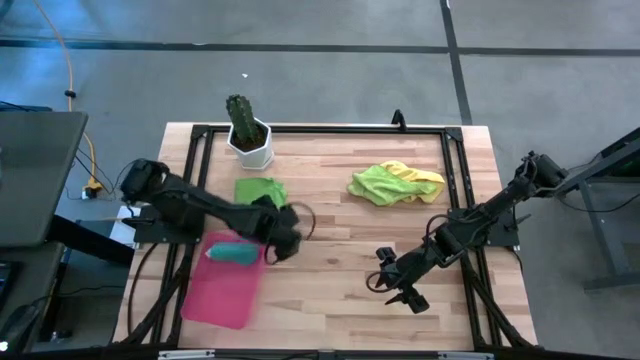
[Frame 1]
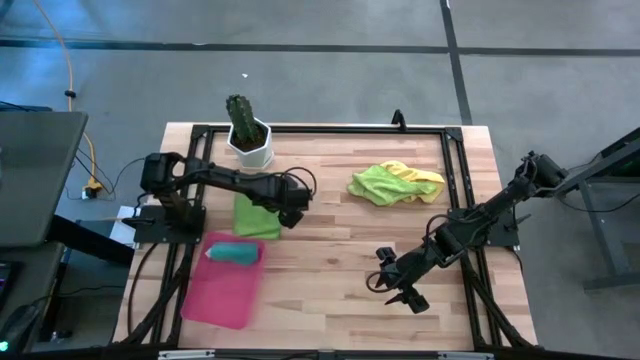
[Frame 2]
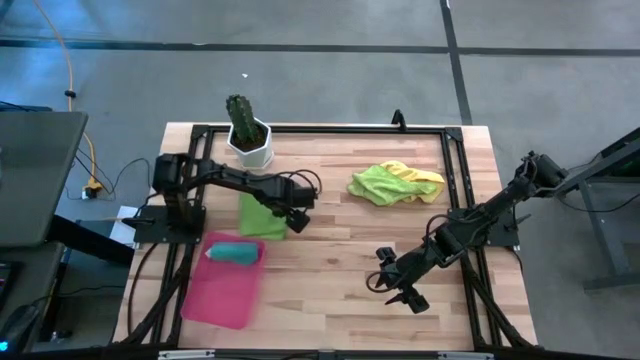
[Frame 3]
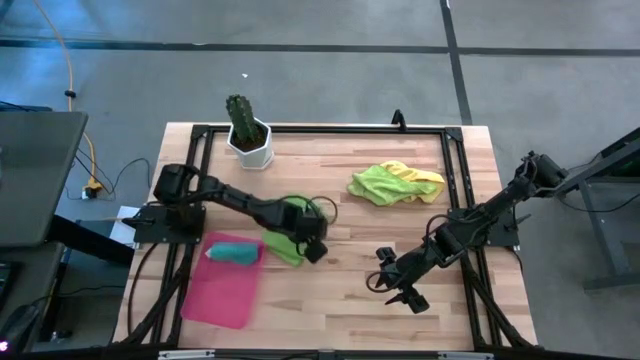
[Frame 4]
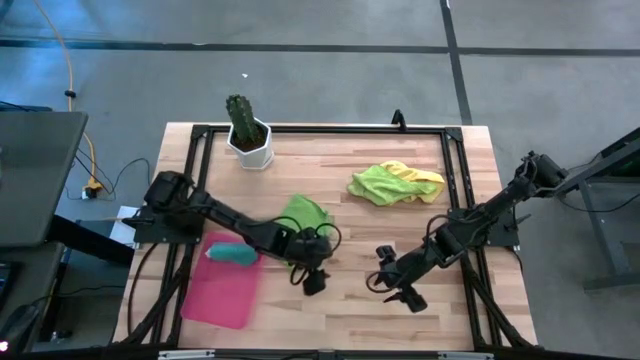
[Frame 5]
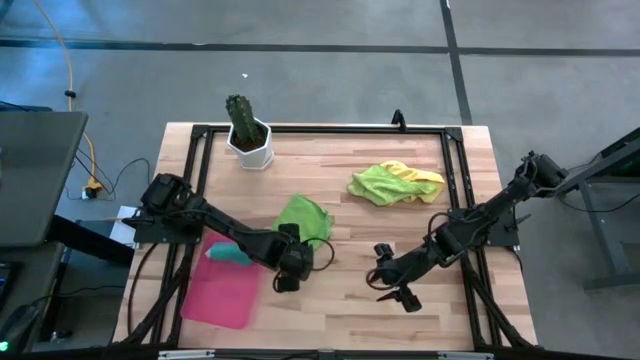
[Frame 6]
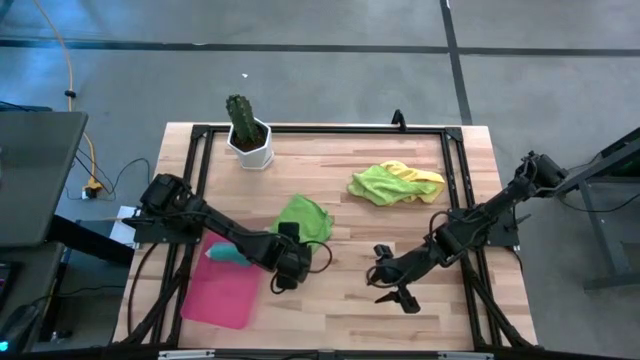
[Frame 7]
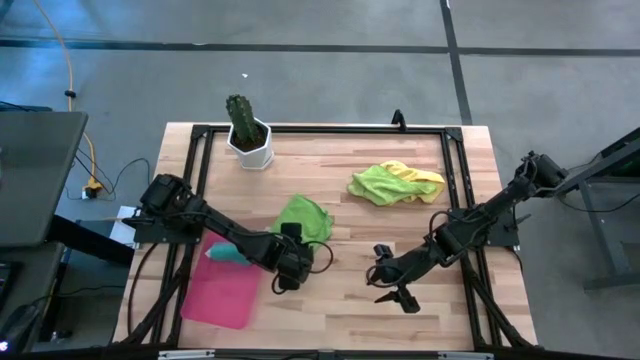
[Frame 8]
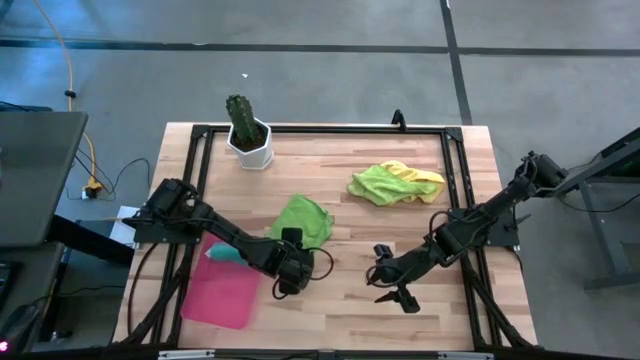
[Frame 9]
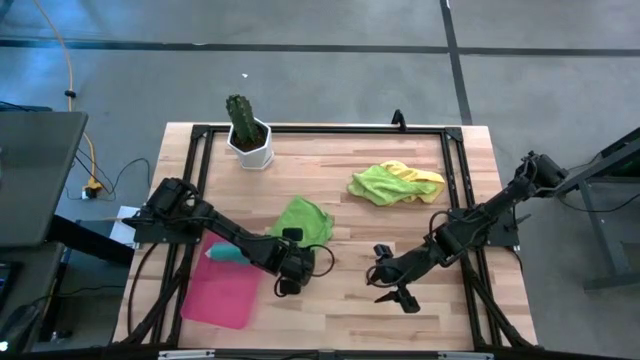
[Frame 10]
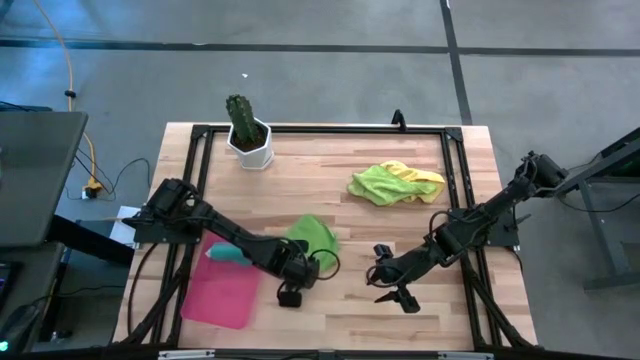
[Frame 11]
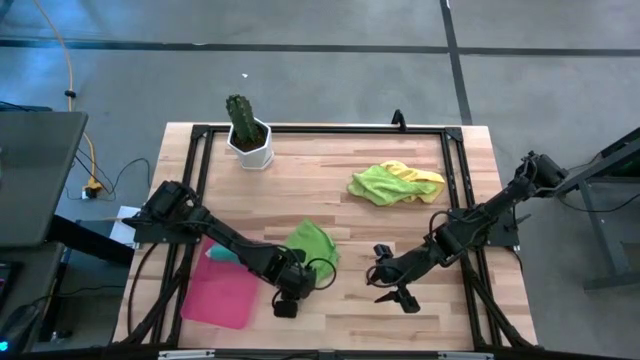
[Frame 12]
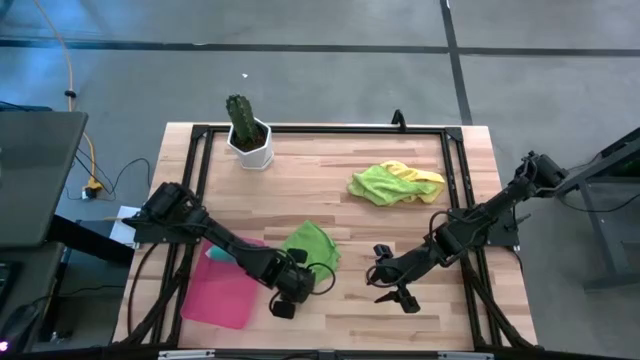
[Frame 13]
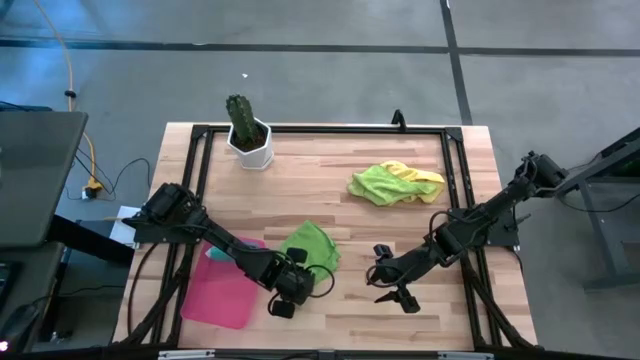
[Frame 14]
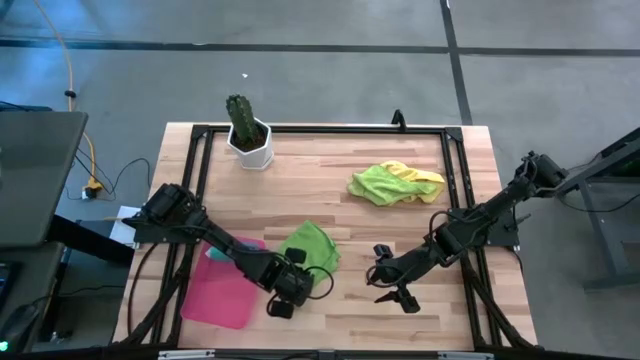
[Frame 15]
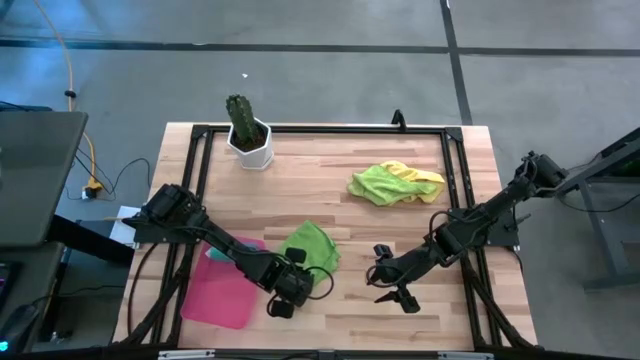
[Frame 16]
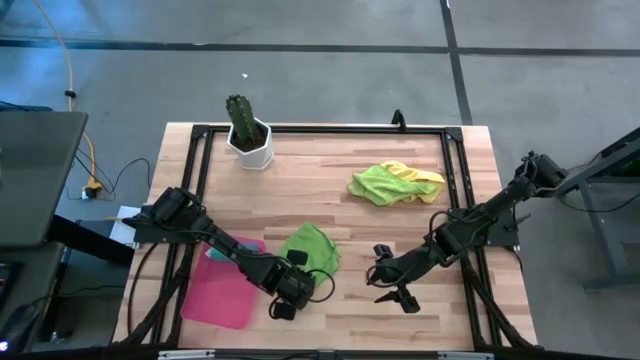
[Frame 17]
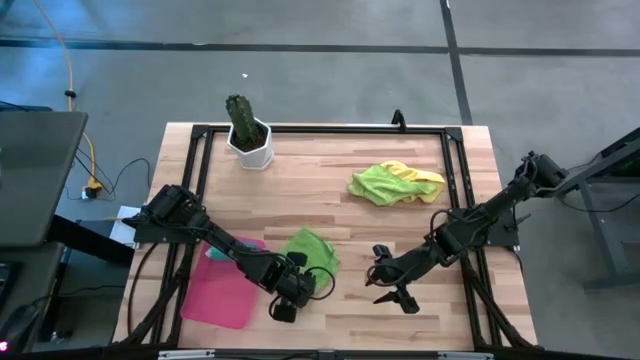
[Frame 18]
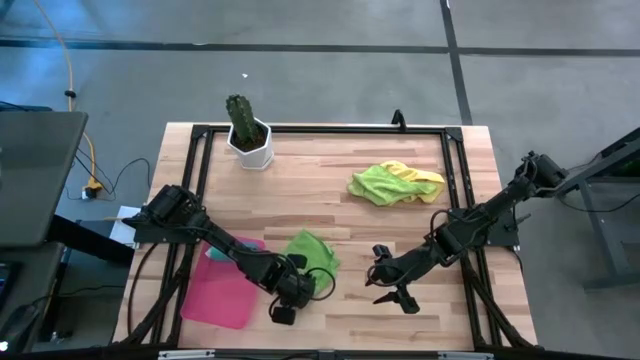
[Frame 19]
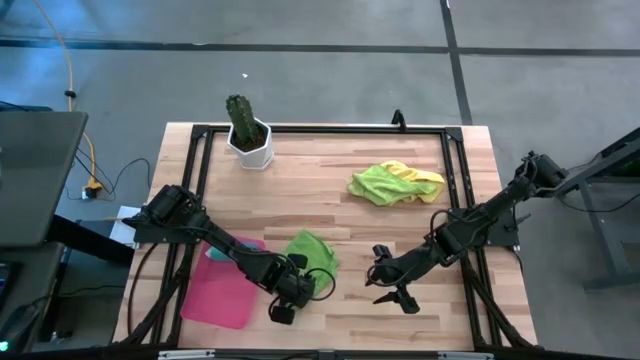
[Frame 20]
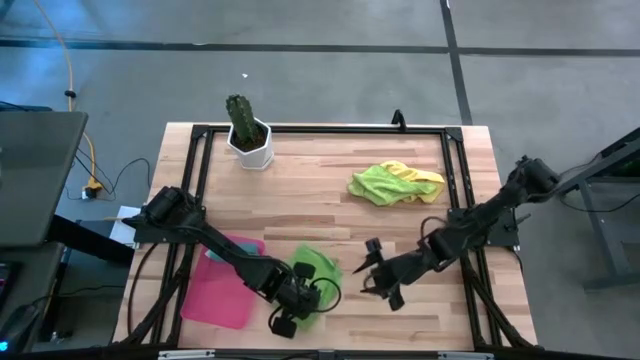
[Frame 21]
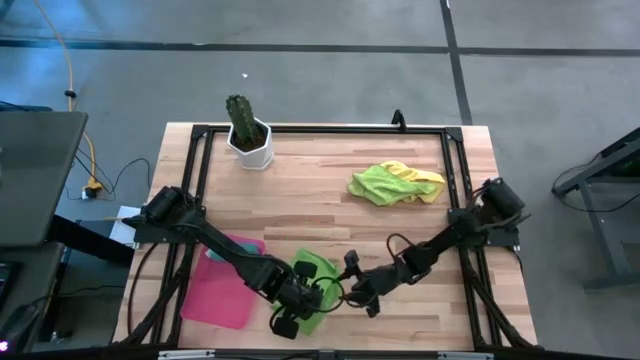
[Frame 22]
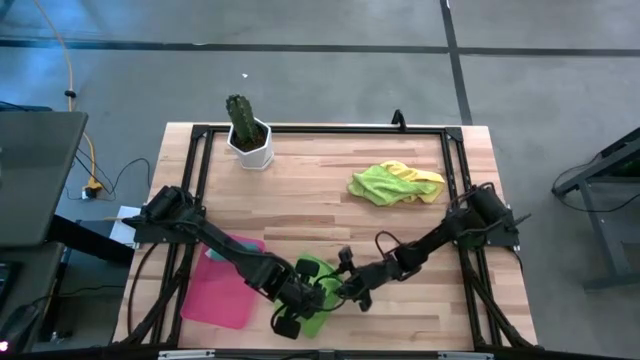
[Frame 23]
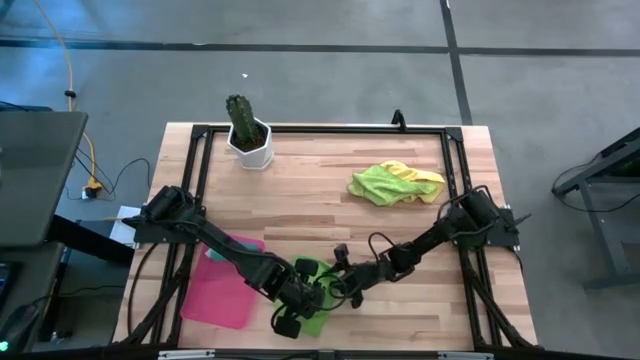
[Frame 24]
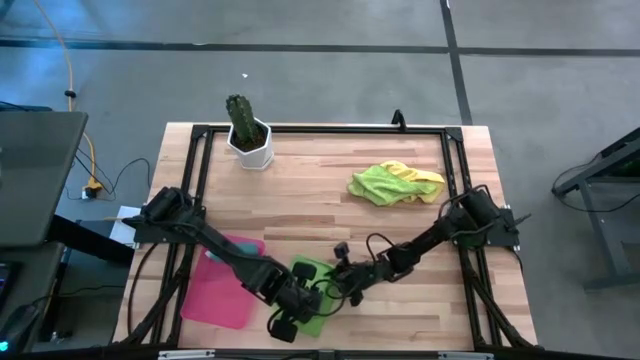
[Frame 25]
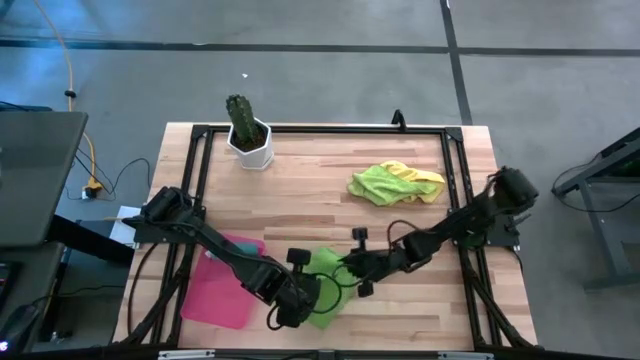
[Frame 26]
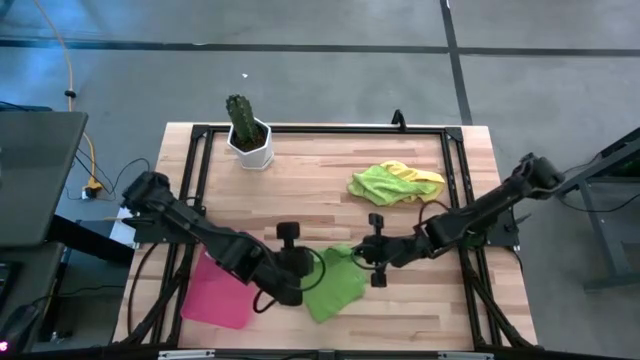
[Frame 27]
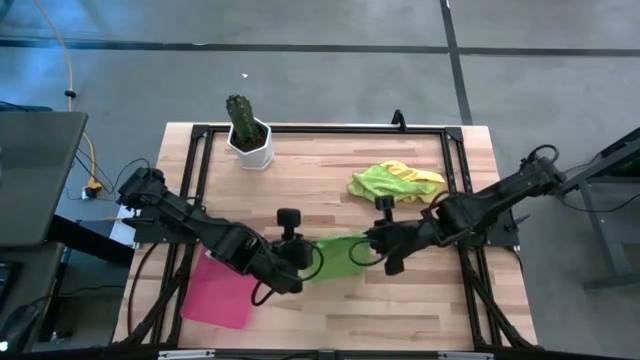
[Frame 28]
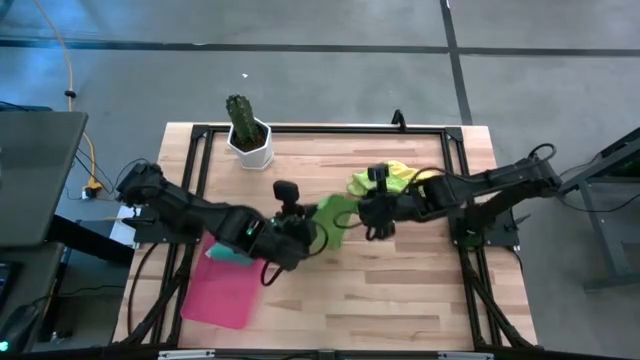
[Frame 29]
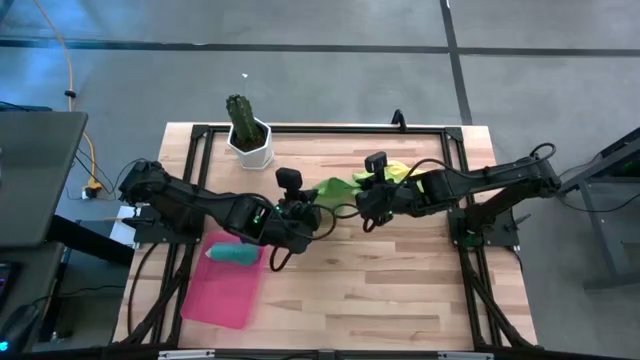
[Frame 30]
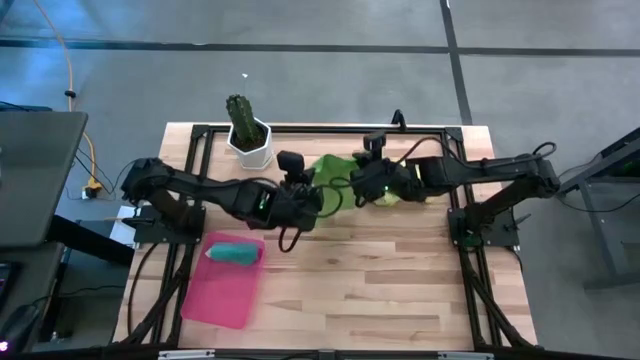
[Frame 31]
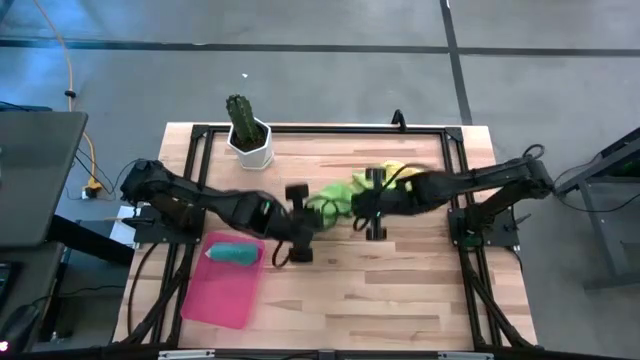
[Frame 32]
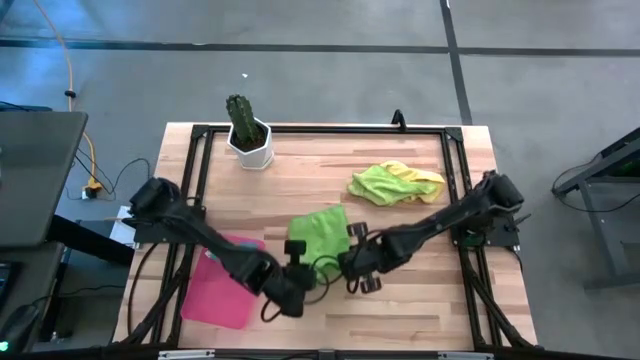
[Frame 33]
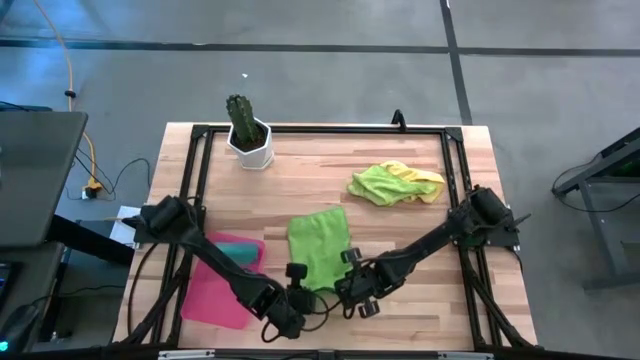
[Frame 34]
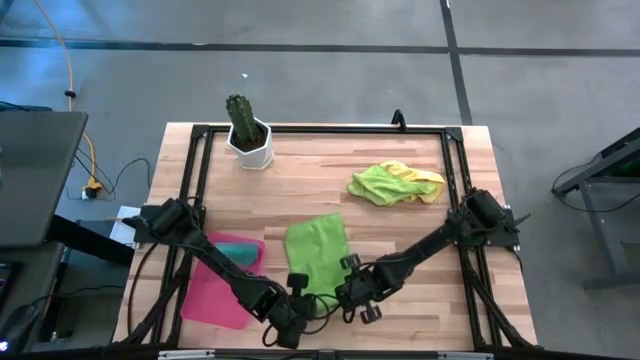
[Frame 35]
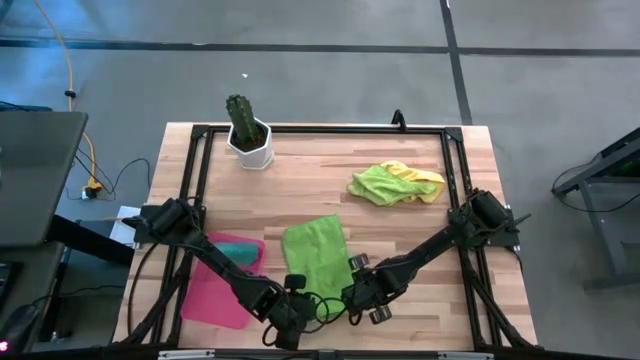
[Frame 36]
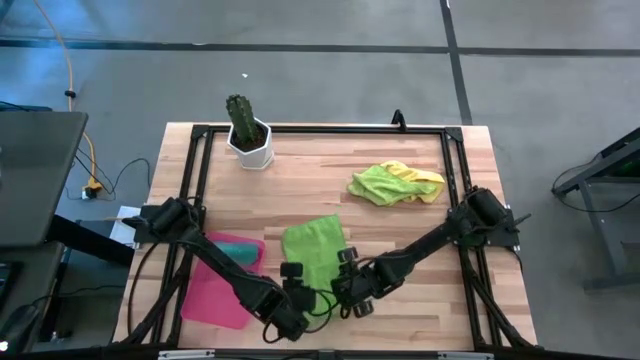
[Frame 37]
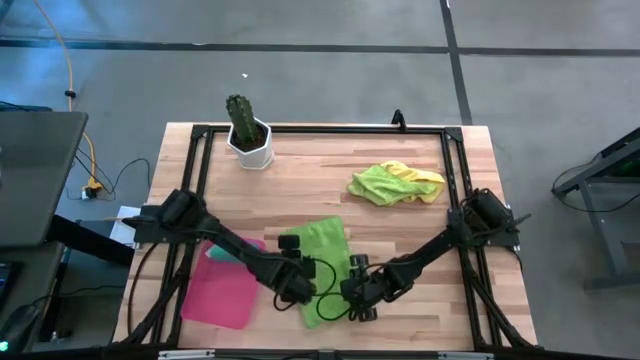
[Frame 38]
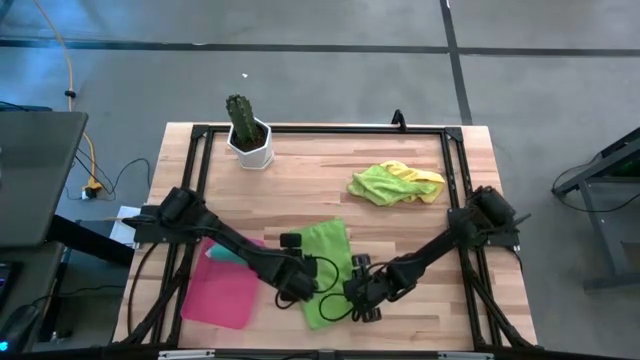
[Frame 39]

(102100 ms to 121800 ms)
Task: Roll microfiber towels into tight, uniform cylinder then place into a basket
Roll the dark green towel
